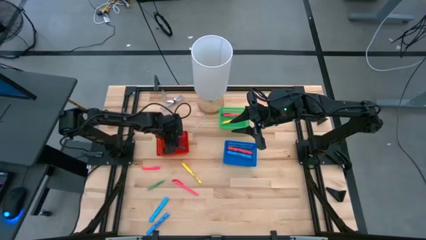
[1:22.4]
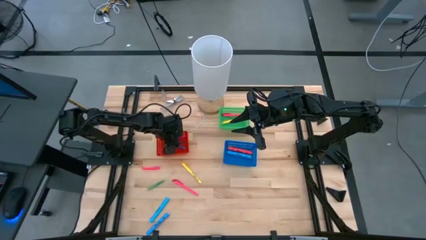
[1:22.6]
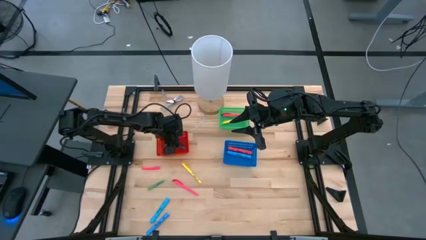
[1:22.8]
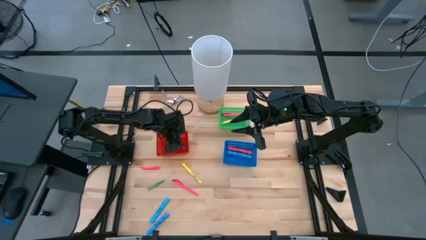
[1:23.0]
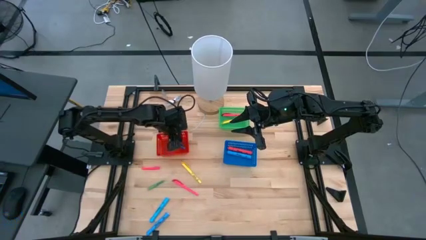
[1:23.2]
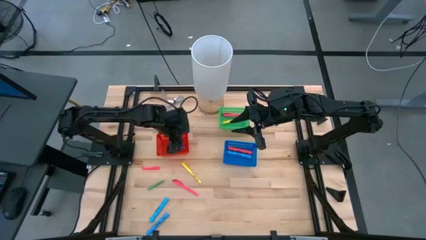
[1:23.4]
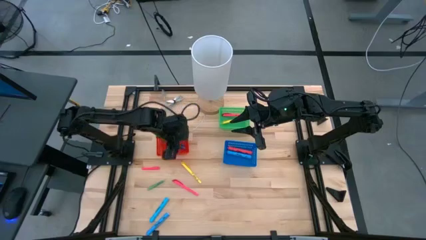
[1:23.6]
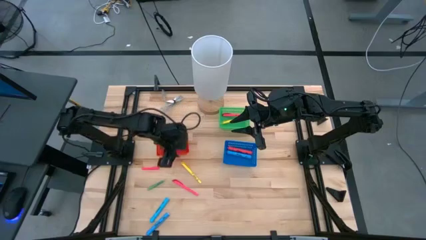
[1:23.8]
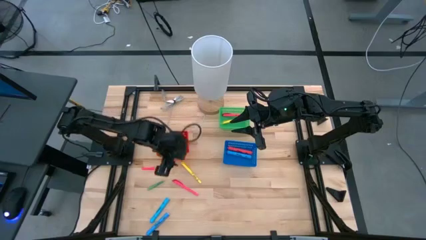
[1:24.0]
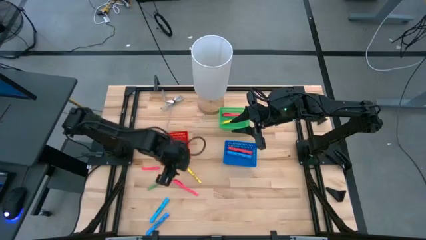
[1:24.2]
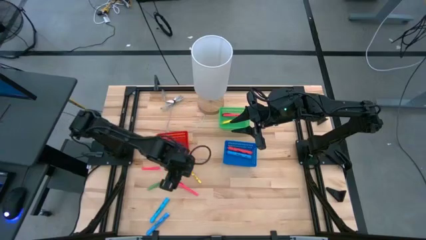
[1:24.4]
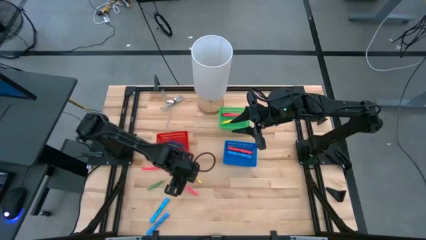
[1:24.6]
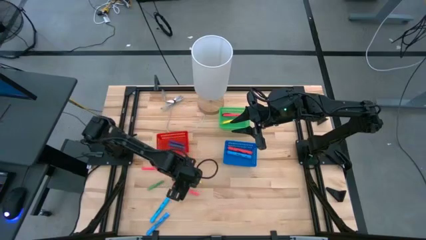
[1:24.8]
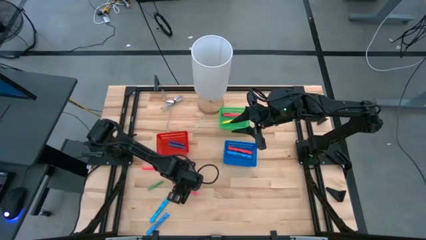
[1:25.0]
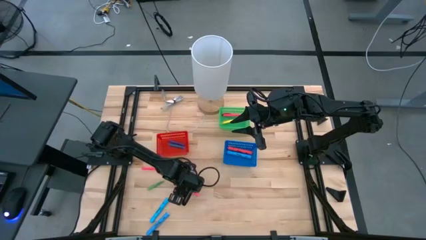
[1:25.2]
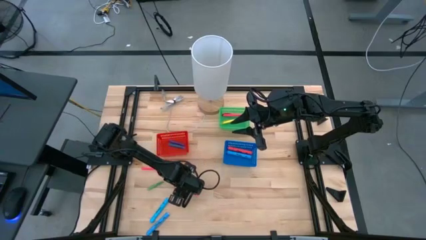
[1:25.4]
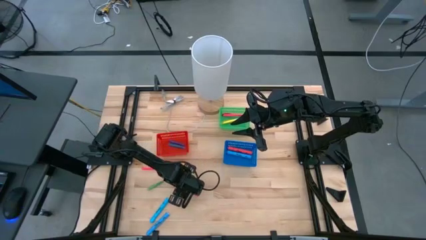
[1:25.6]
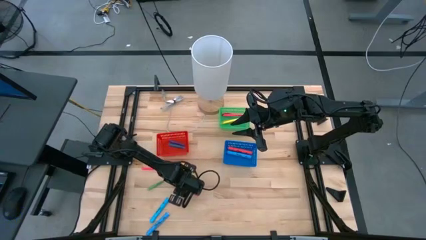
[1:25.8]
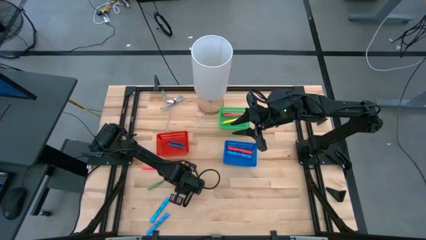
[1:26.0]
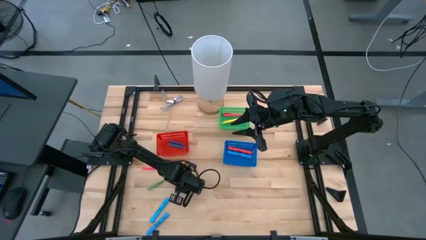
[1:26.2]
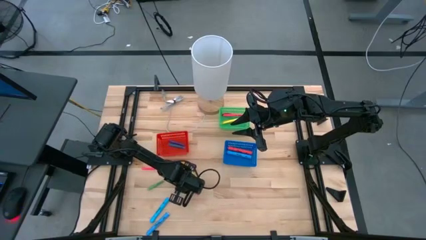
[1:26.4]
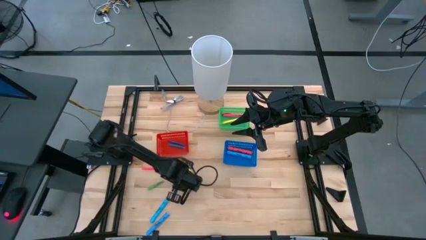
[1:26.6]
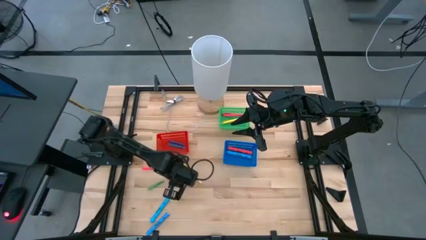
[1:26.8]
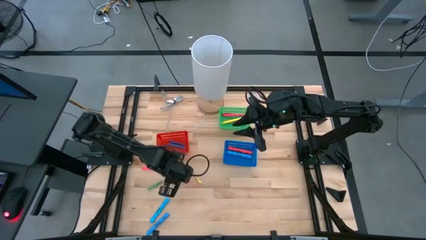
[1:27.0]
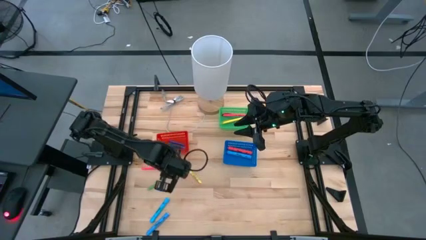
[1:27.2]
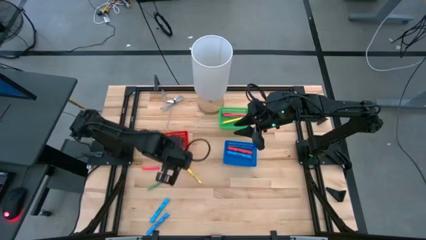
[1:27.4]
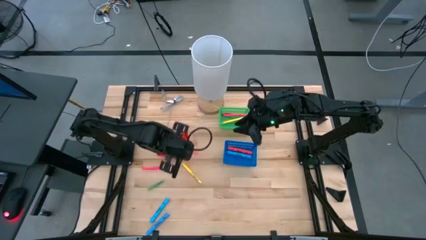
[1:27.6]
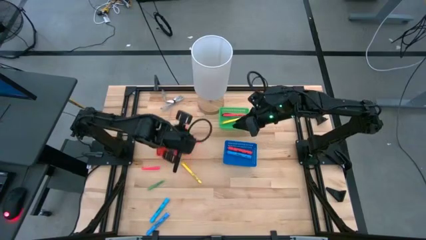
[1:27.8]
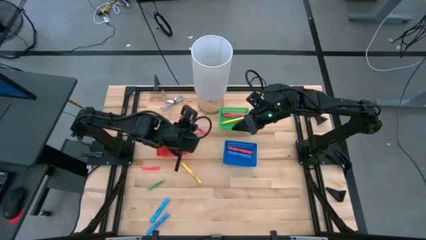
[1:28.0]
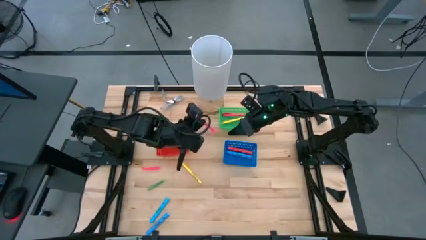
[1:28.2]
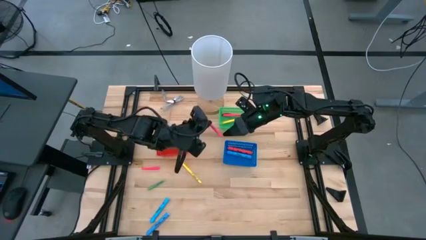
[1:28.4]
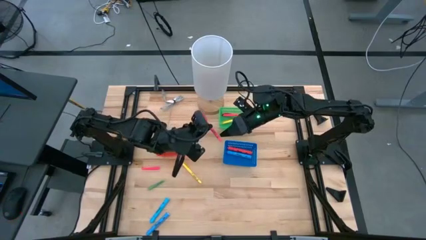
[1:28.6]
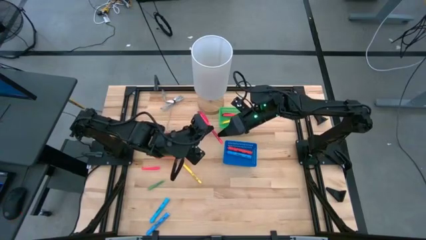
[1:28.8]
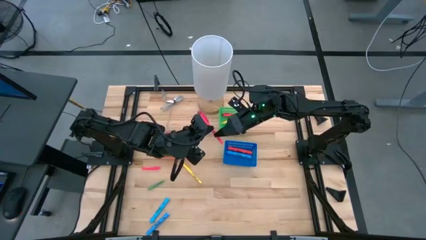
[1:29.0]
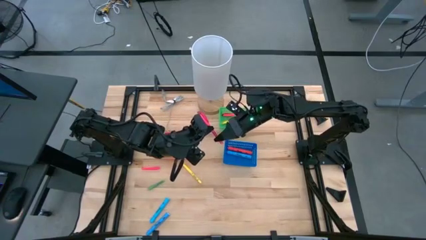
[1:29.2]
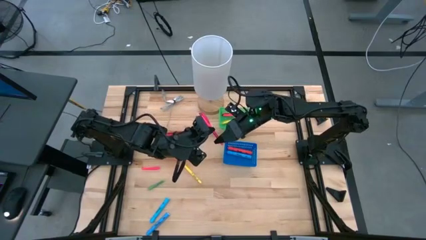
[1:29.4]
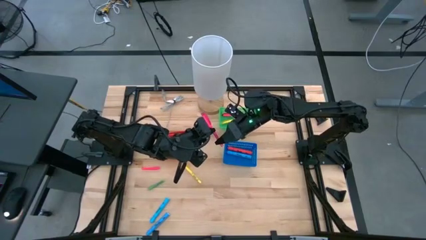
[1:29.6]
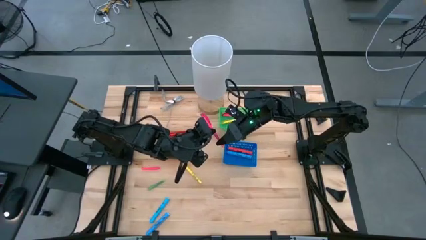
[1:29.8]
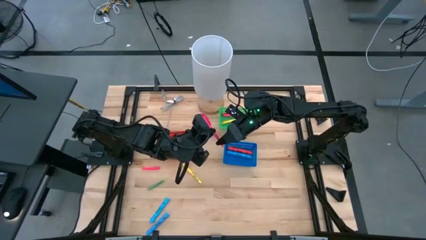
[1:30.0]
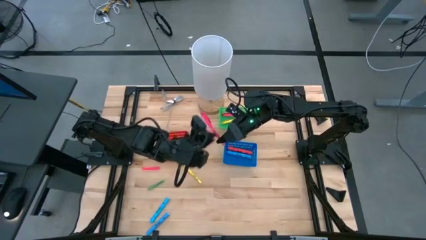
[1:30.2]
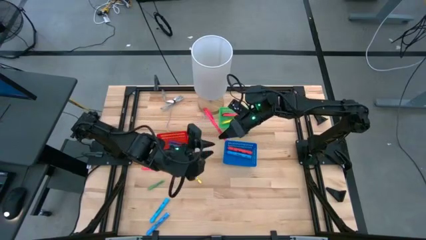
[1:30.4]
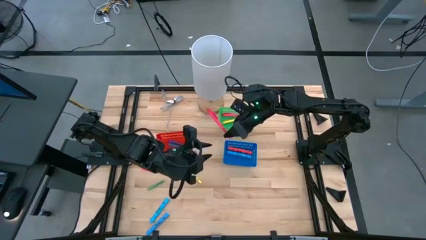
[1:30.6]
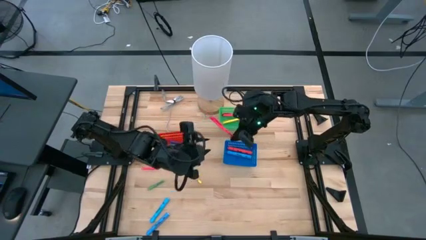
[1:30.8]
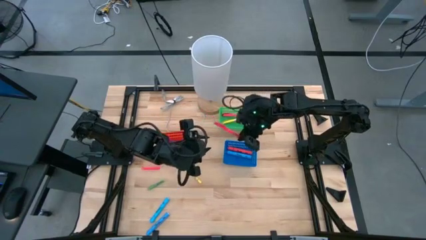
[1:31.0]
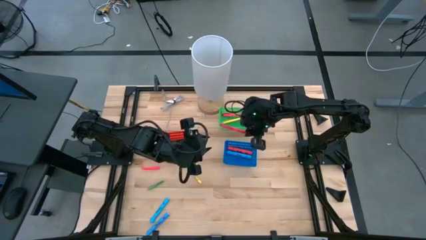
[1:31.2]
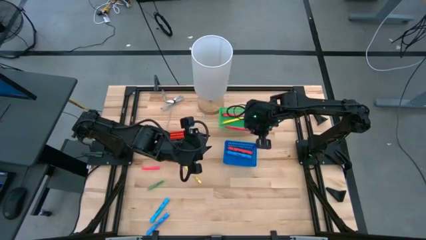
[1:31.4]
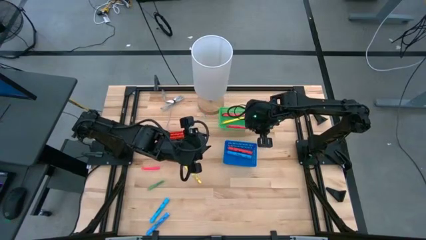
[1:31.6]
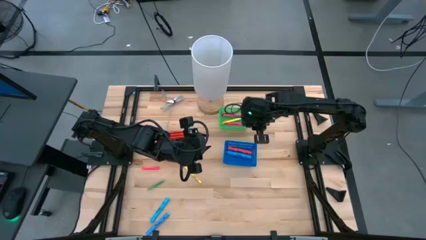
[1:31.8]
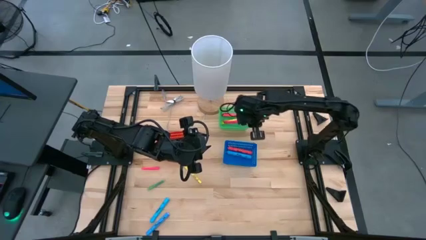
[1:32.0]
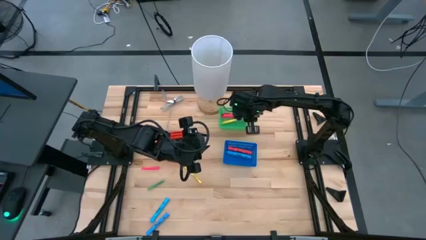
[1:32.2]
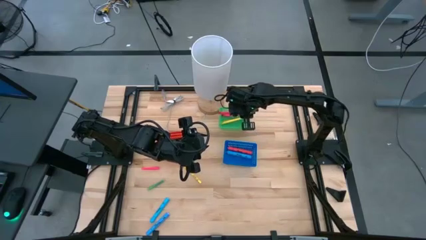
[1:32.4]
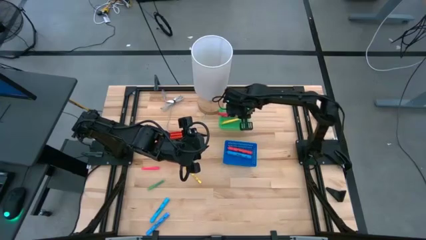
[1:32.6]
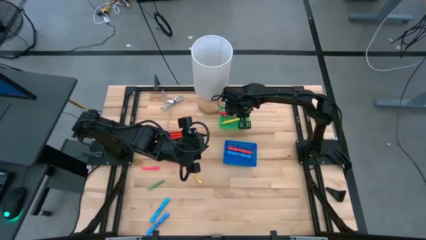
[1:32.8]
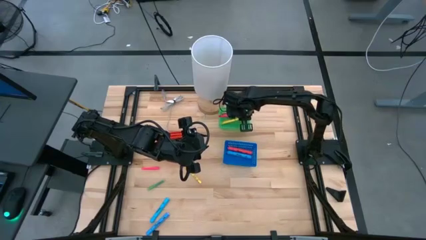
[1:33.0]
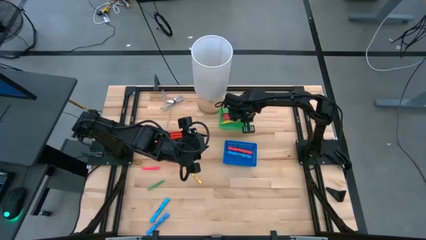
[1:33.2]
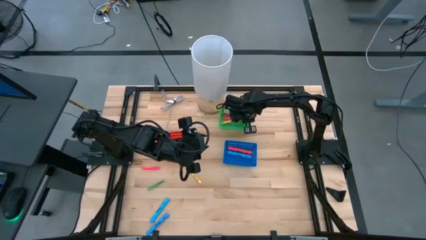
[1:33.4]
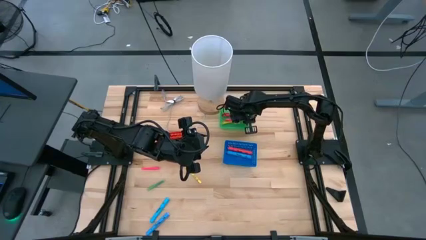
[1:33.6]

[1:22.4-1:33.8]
Task: Pick & Place Markers
Put the large pink pen into the green bin
